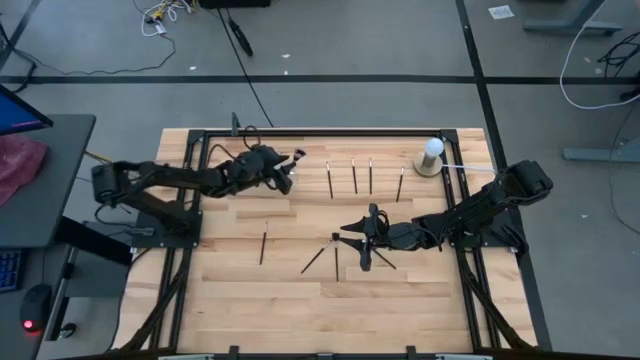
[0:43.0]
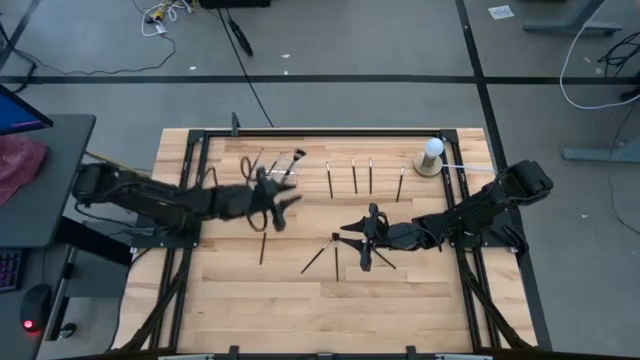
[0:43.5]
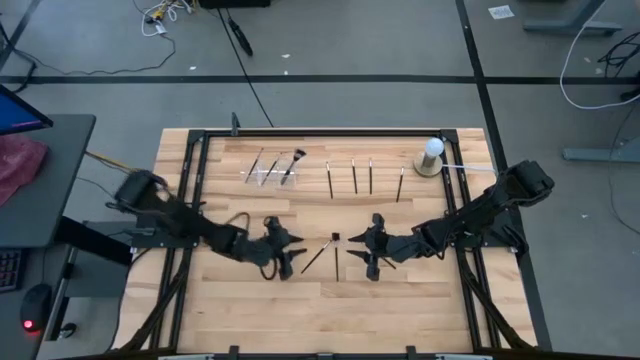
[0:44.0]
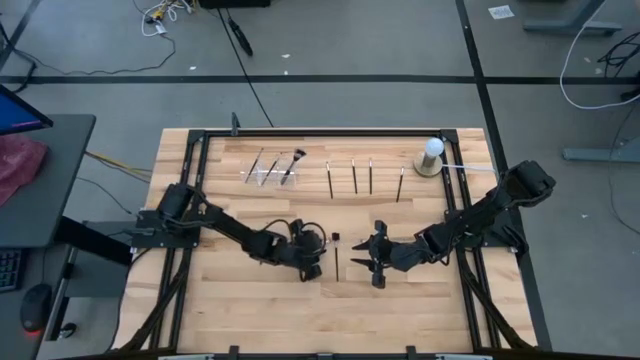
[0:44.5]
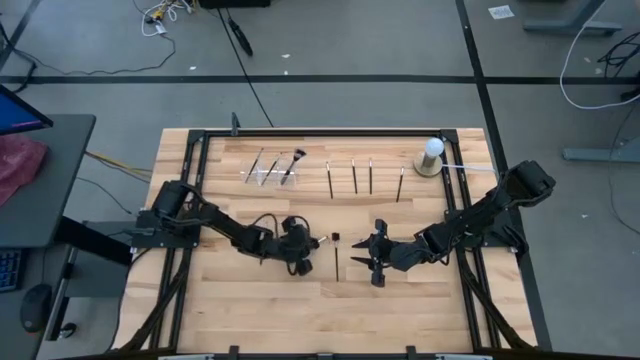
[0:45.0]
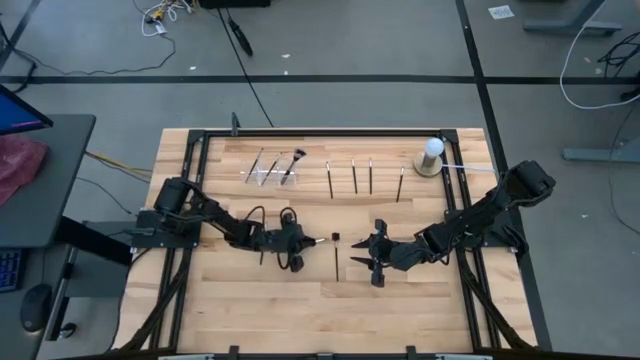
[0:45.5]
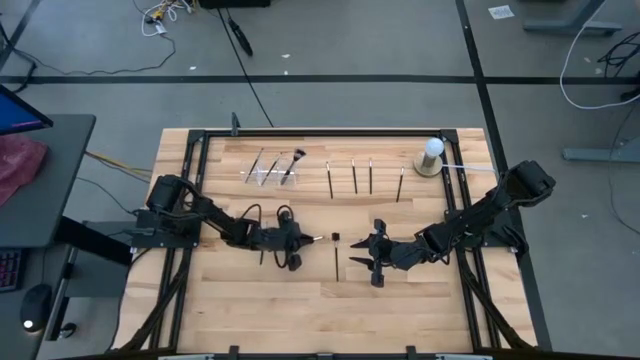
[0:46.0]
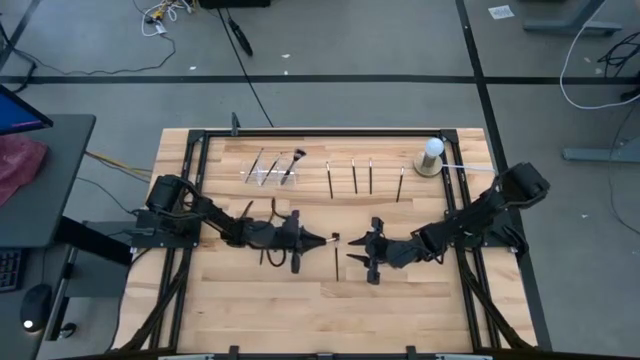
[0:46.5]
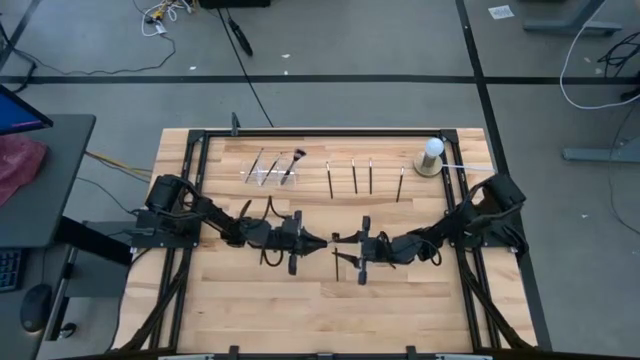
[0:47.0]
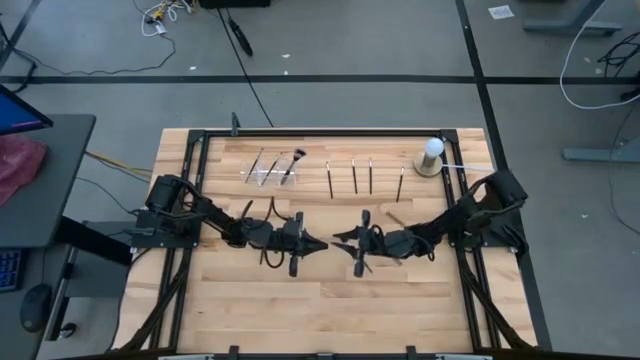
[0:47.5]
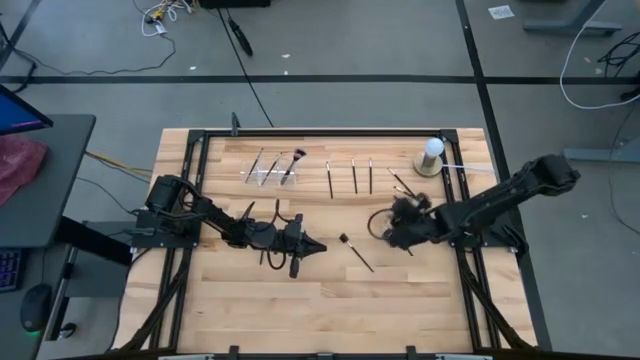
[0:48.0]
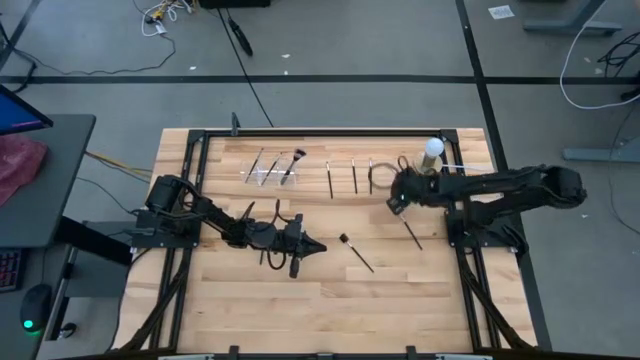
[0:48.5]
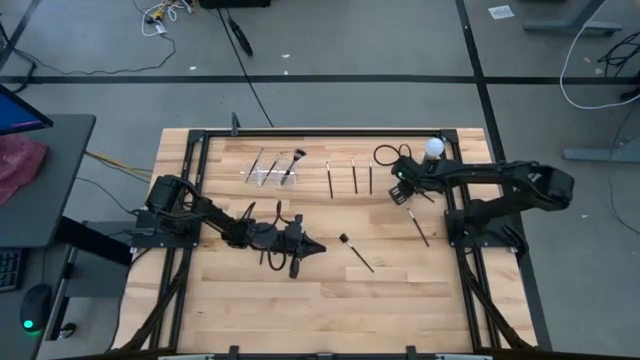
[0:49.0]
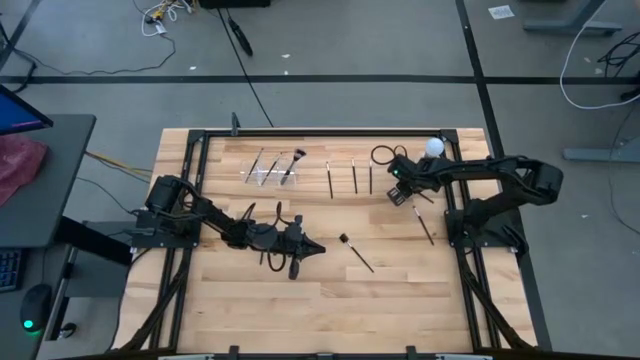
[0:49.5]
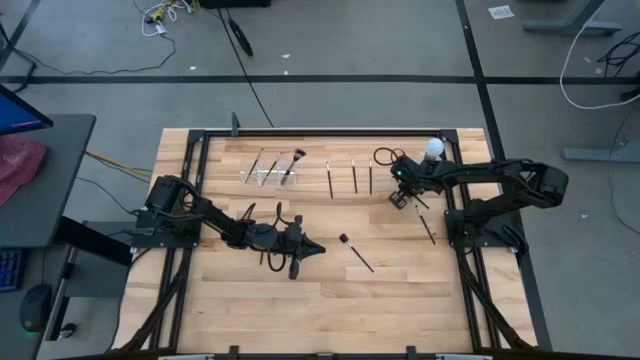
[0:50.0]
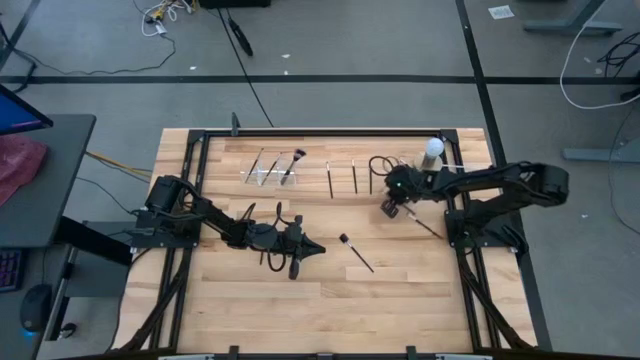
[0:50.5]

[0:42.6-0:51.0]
Task: Put items in baskets/containers
Put the eyeshadow brush into the transparent organizer

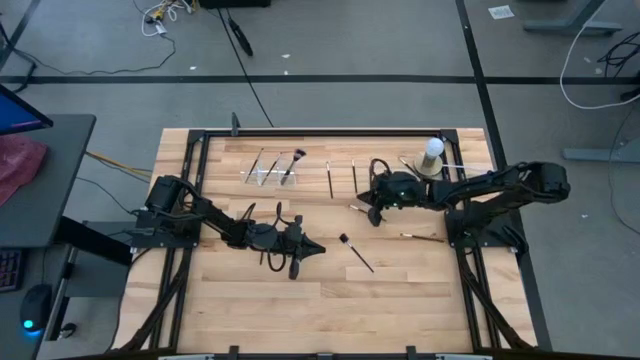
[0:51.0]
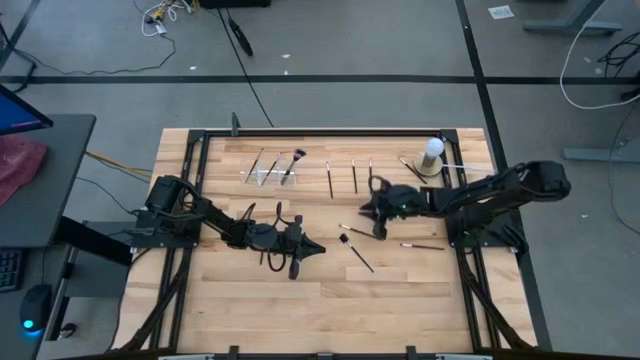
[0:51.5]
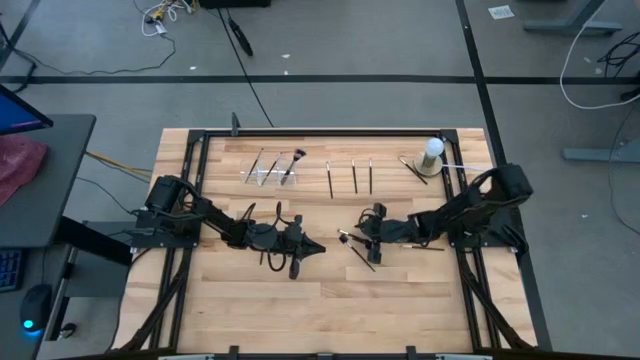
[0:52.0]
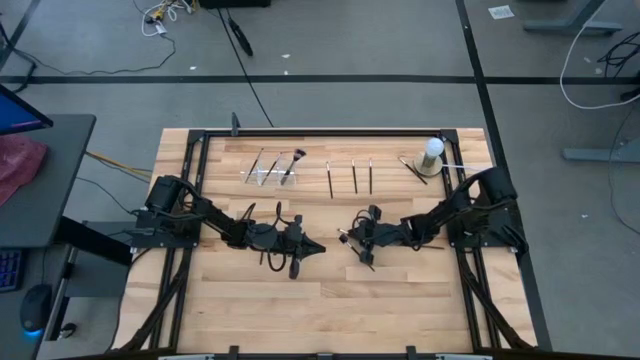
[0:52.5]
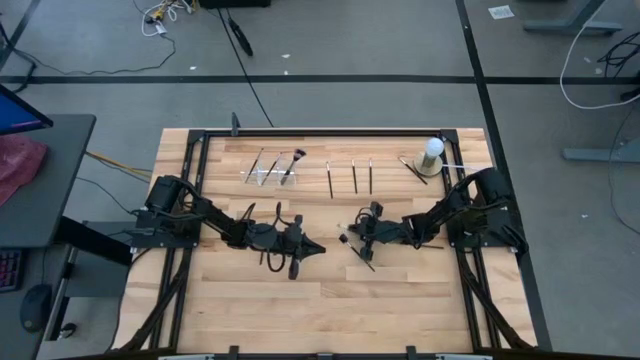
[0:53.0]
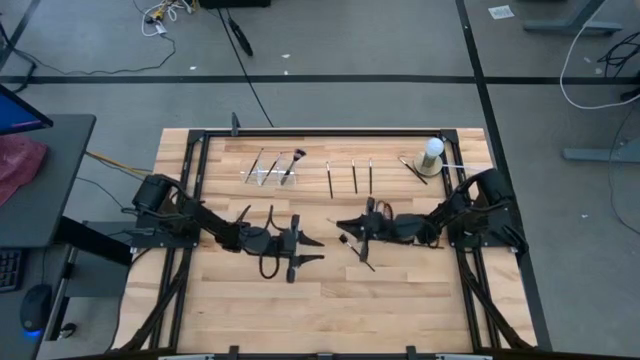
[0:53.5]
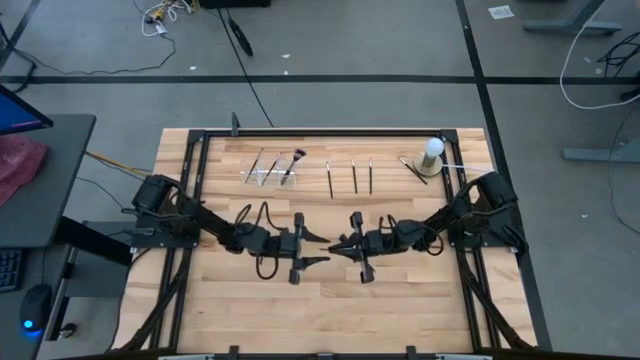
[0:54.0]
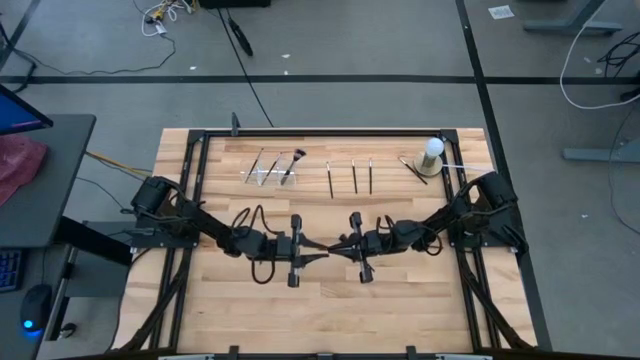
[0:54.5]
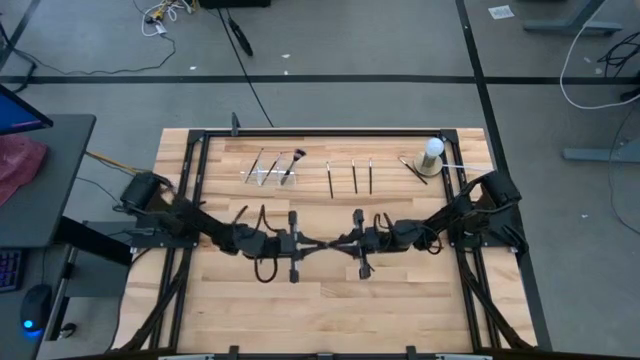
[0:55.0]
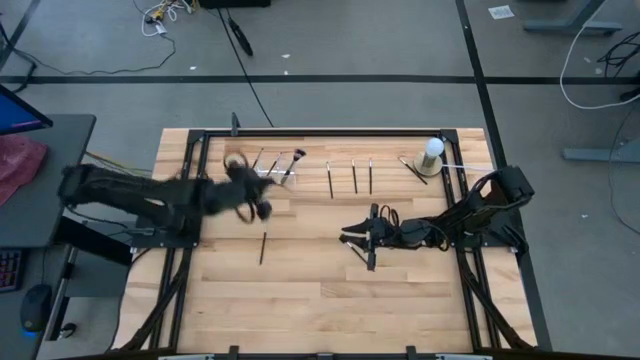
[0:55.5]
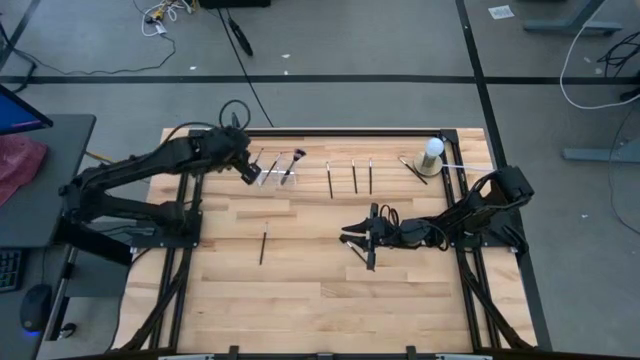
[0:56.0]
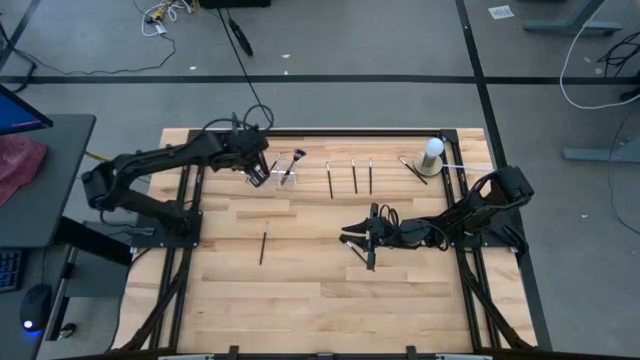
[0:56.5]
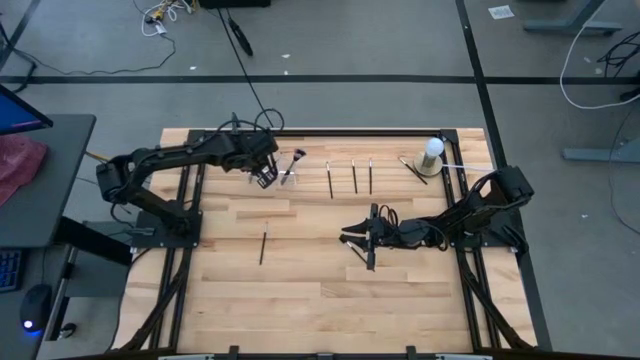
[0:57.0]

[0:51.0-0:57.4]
Put the eyeshadow brush into the transparent organizer

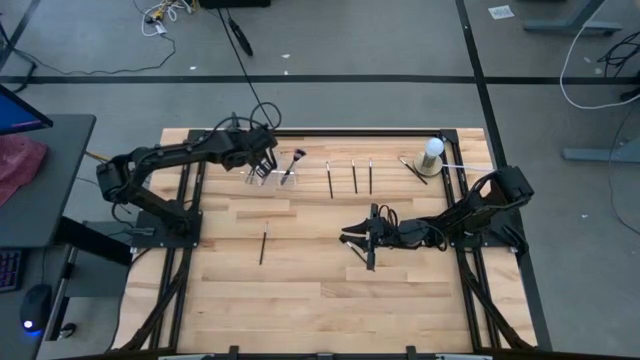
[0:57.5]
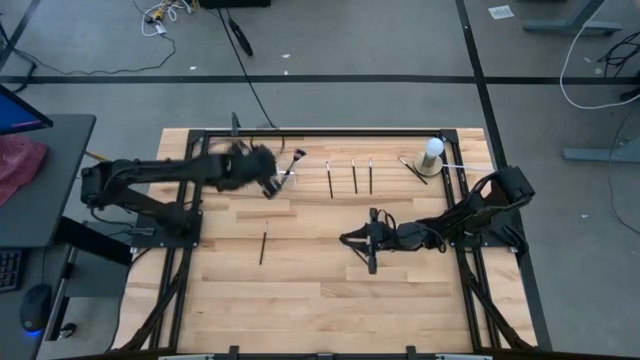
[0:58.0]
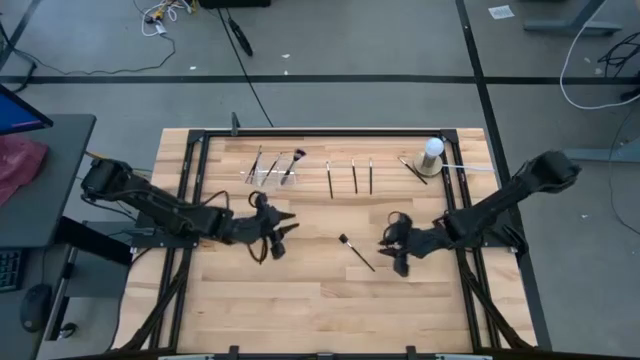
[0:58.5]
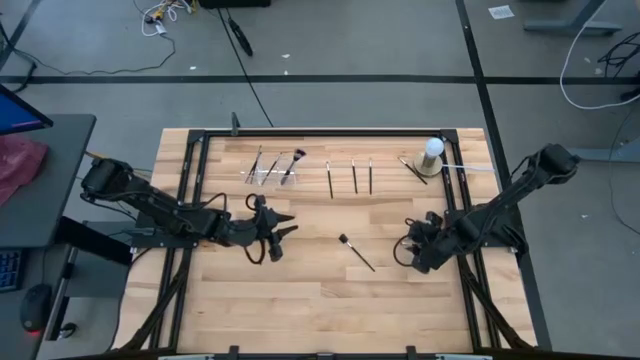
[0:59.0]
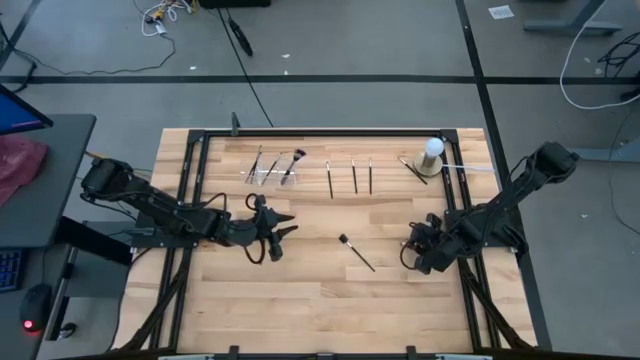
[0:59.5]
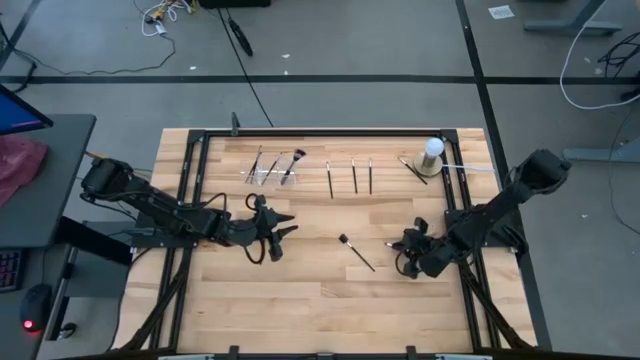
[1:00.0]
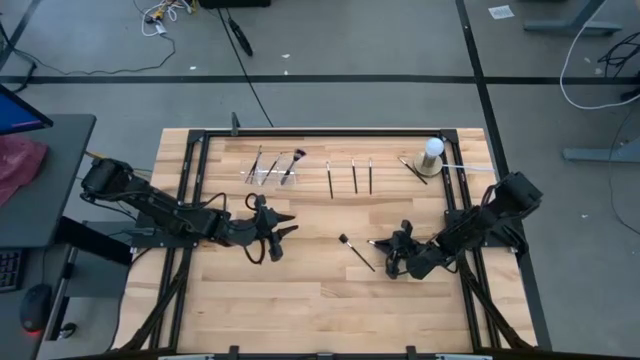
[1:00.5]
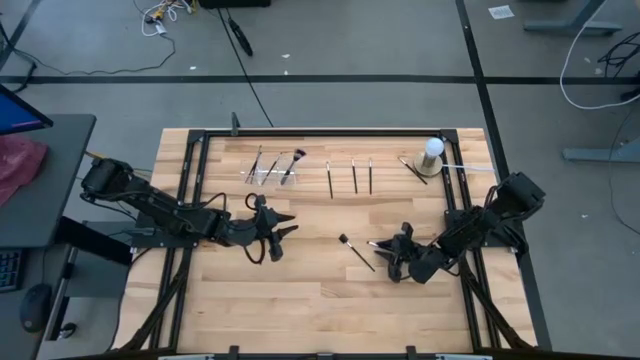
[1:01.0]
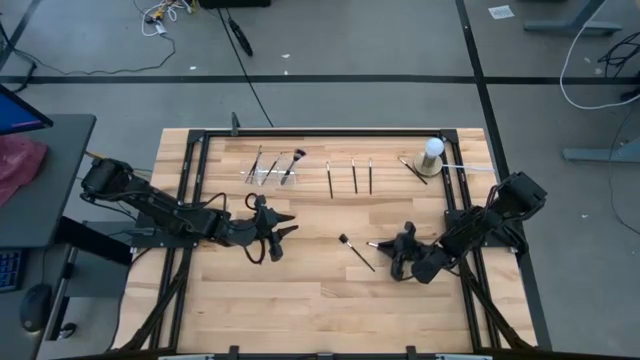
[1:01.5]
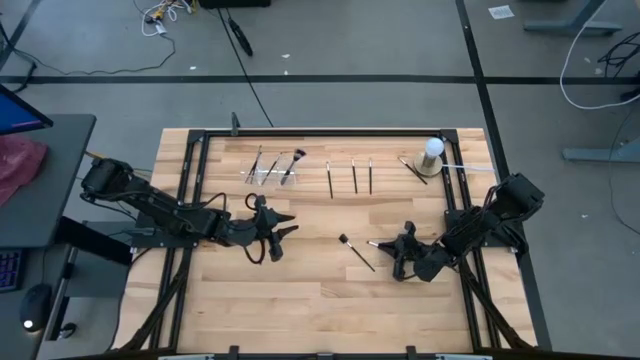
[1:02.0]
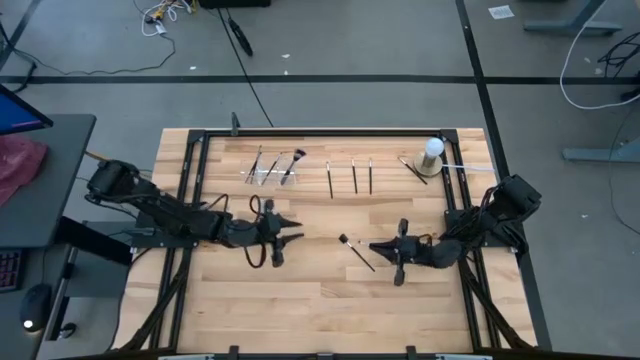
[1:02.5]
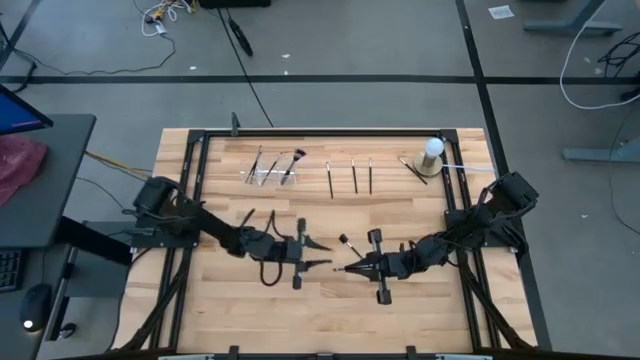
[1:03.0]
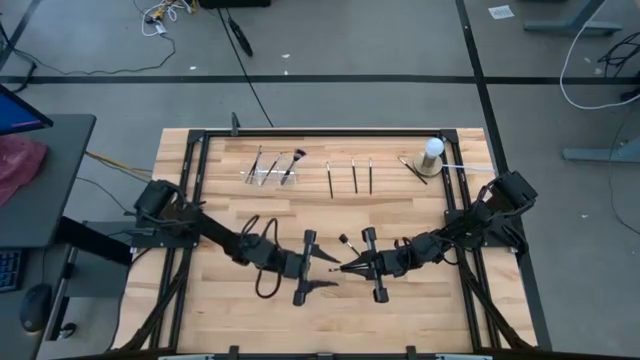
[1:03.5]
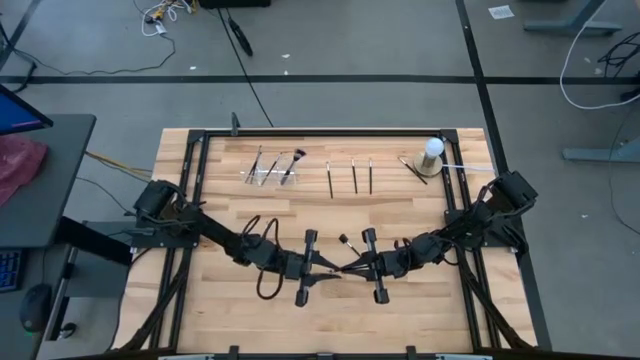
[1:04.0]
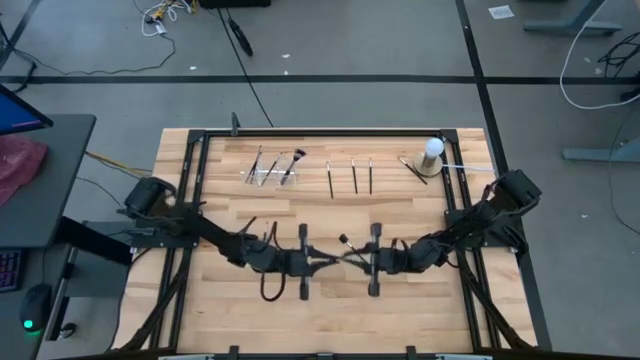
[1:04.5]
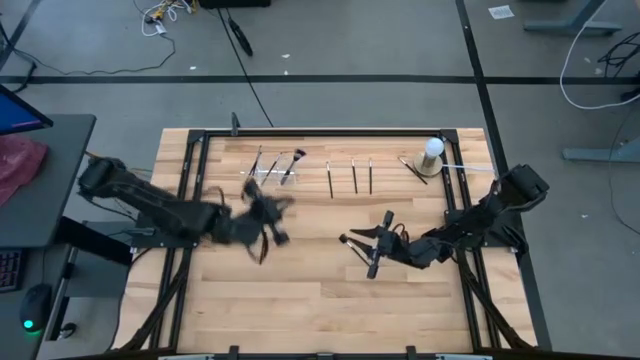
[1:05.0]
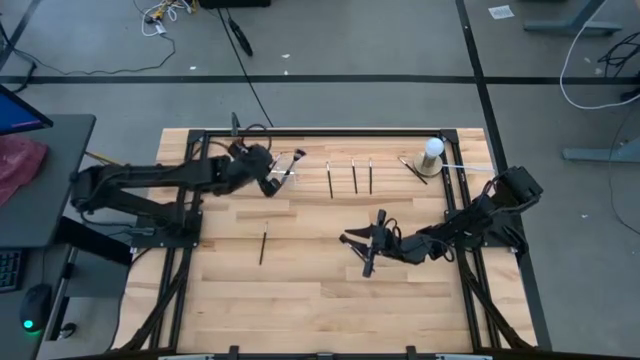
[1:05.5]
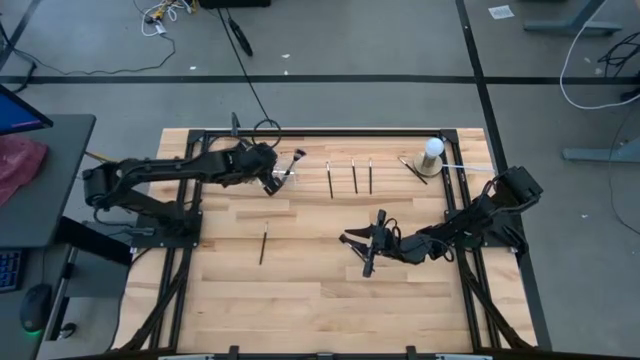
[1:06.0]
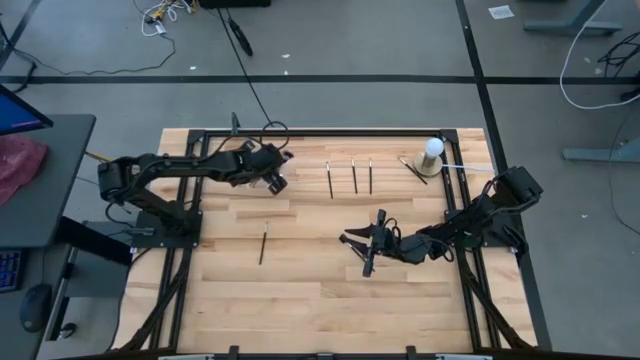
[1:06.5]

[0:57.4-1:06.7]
Put the eyeshadow brush into the transparent organizer
